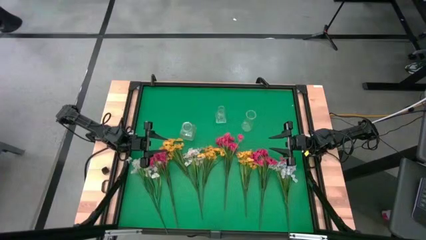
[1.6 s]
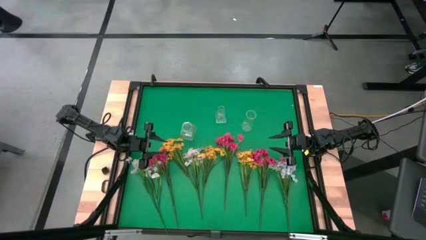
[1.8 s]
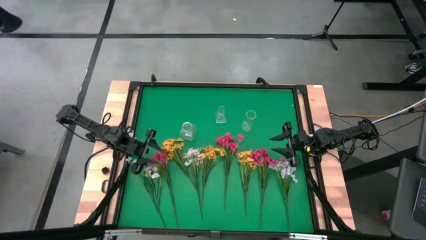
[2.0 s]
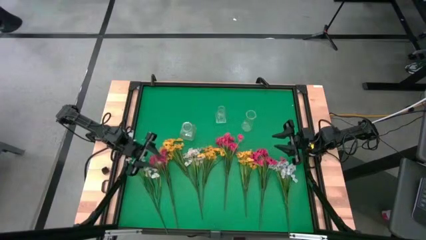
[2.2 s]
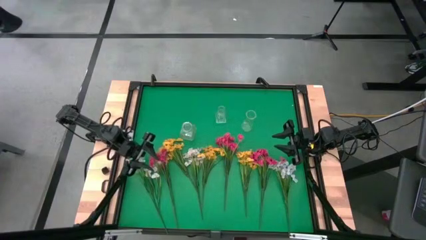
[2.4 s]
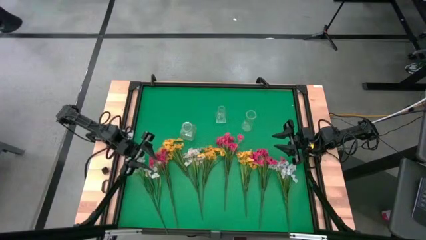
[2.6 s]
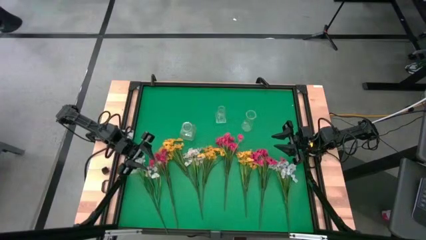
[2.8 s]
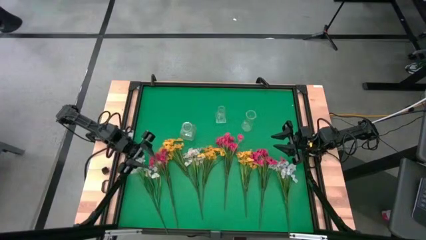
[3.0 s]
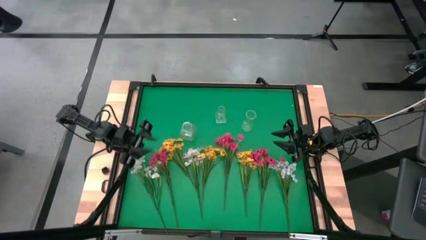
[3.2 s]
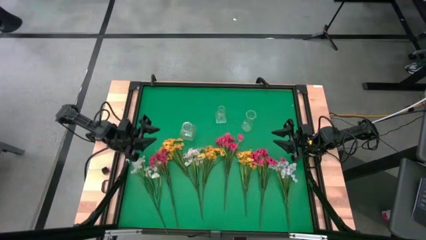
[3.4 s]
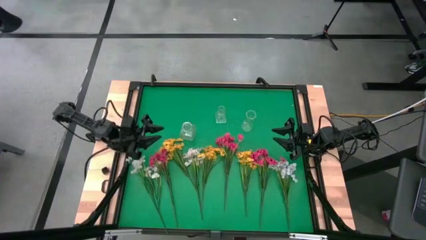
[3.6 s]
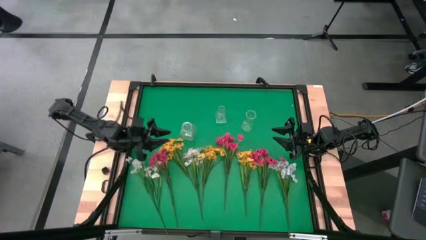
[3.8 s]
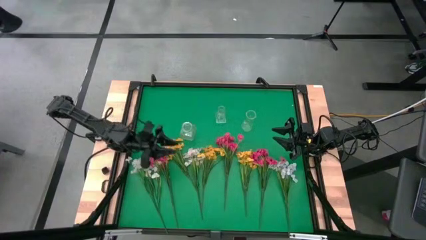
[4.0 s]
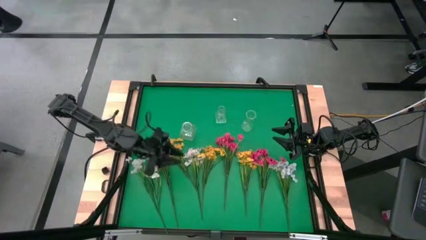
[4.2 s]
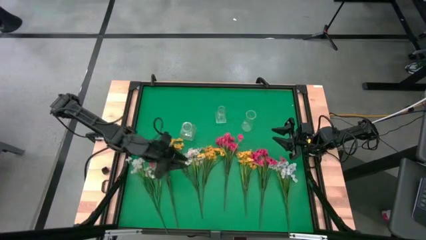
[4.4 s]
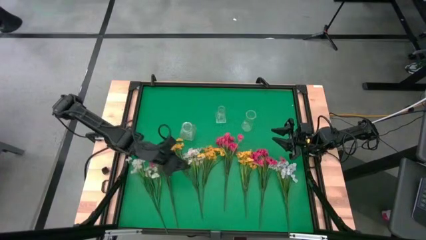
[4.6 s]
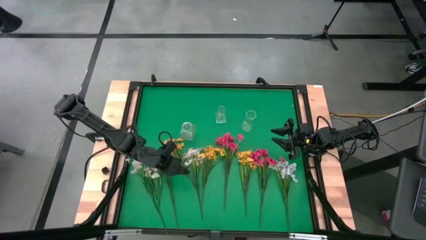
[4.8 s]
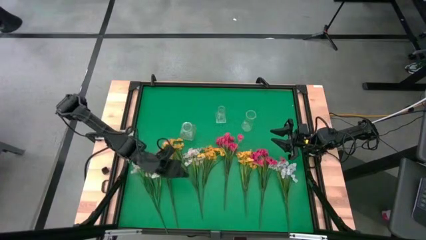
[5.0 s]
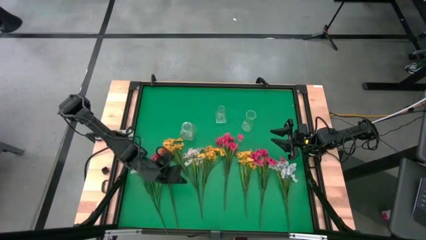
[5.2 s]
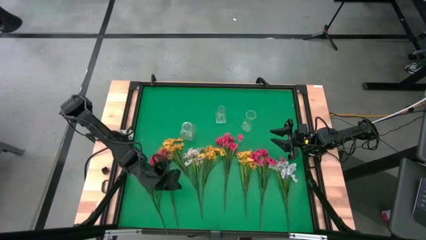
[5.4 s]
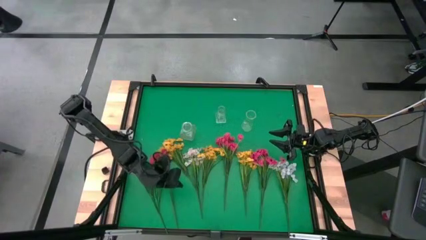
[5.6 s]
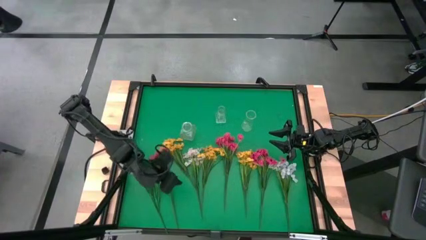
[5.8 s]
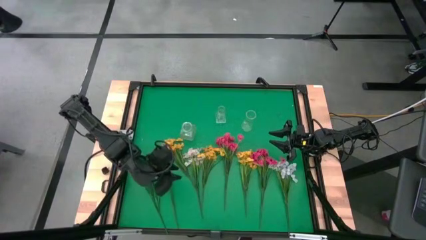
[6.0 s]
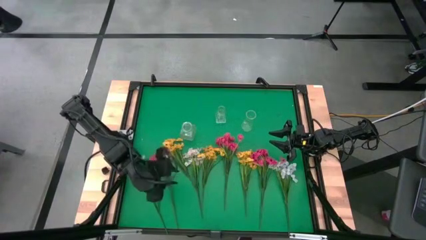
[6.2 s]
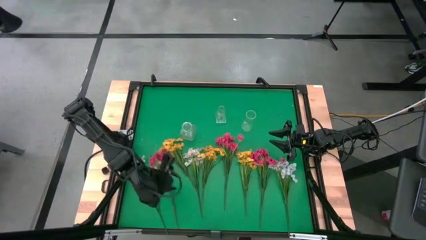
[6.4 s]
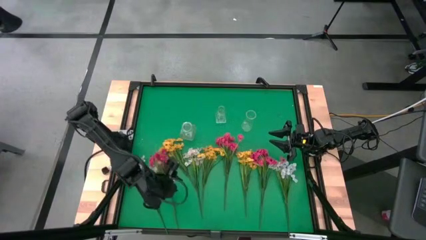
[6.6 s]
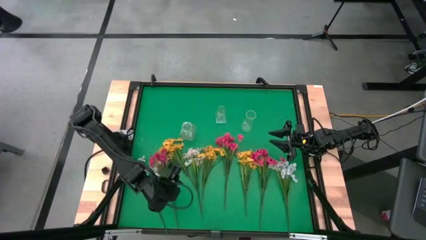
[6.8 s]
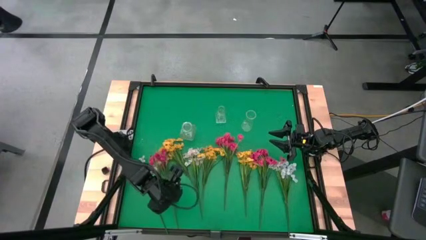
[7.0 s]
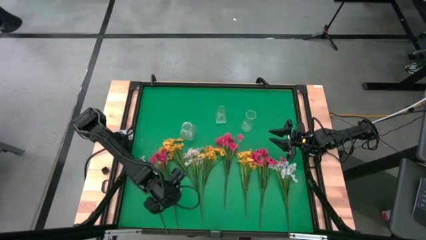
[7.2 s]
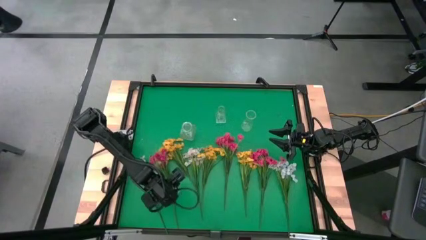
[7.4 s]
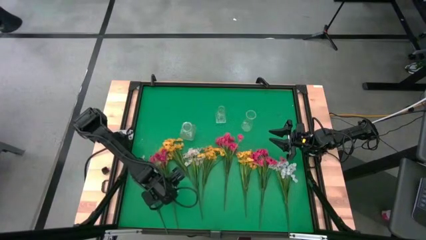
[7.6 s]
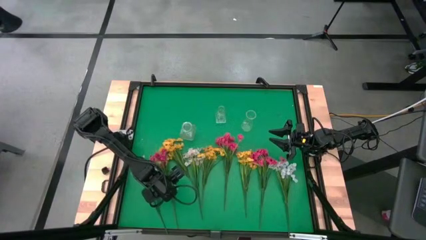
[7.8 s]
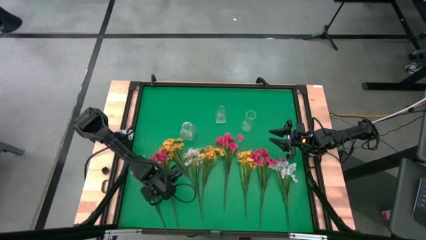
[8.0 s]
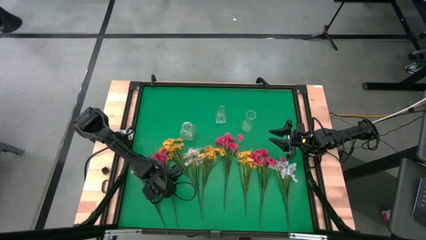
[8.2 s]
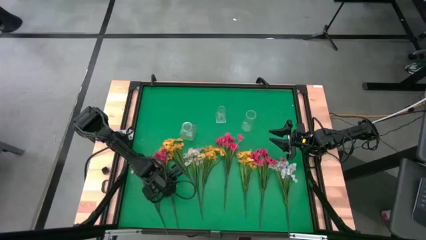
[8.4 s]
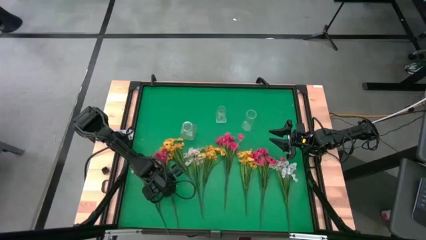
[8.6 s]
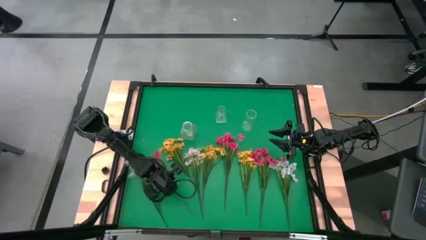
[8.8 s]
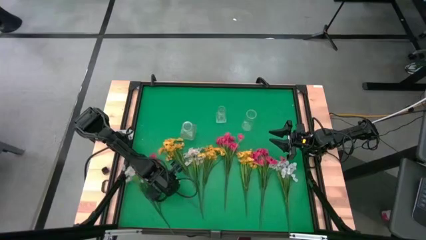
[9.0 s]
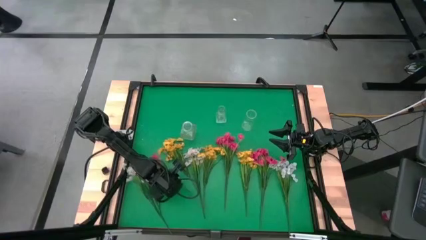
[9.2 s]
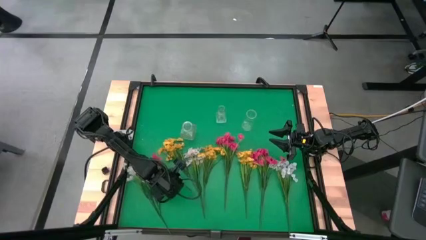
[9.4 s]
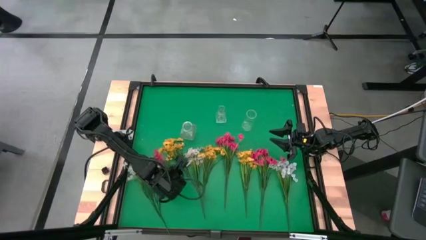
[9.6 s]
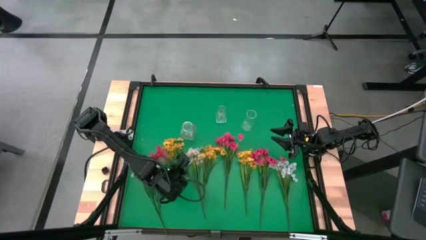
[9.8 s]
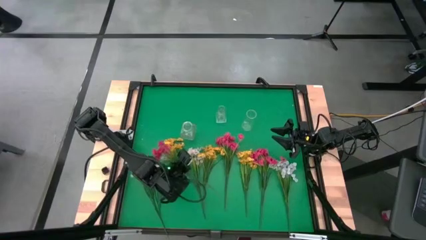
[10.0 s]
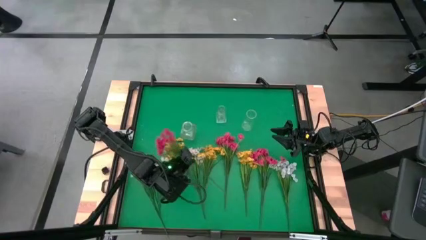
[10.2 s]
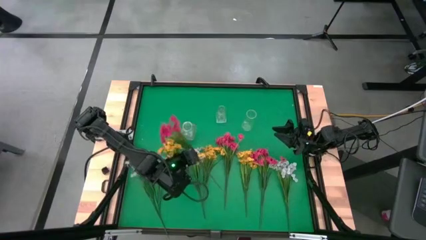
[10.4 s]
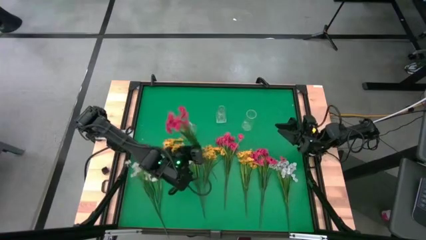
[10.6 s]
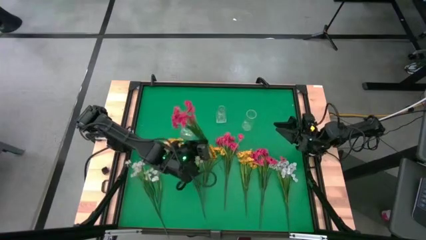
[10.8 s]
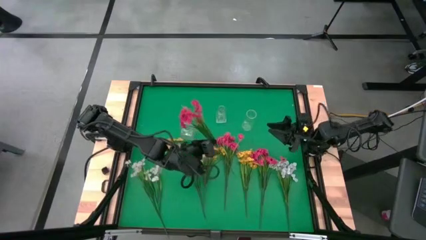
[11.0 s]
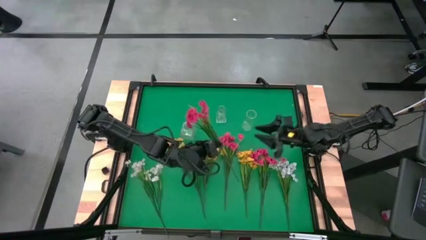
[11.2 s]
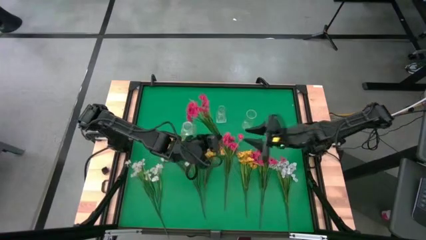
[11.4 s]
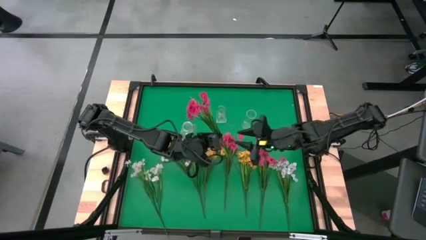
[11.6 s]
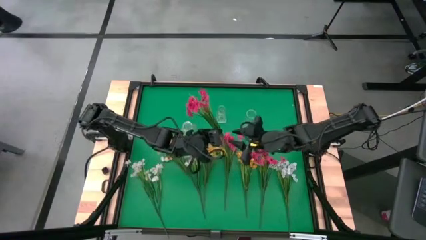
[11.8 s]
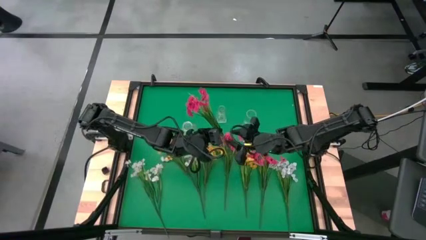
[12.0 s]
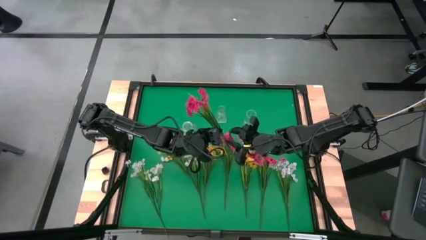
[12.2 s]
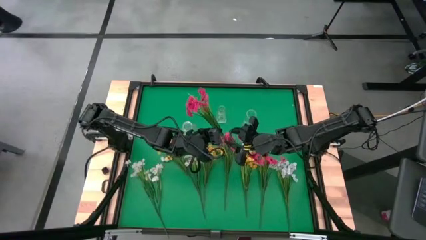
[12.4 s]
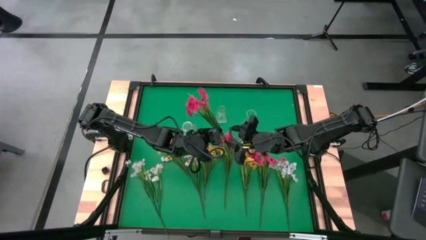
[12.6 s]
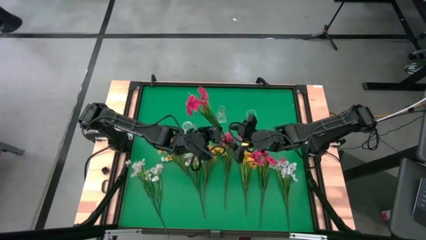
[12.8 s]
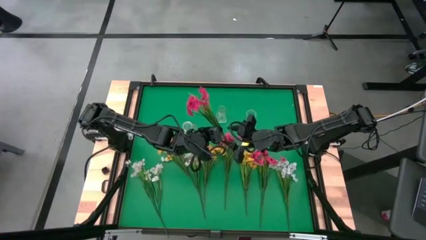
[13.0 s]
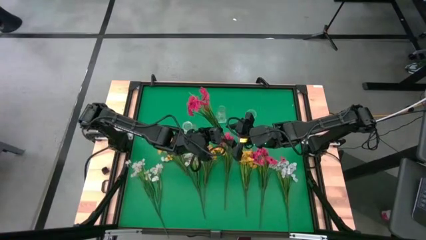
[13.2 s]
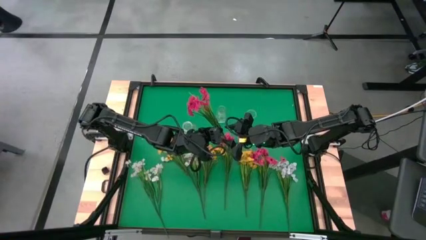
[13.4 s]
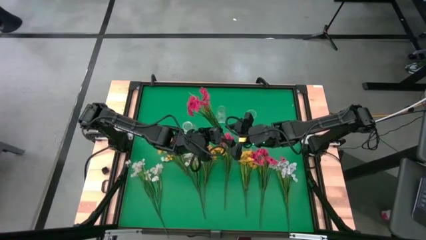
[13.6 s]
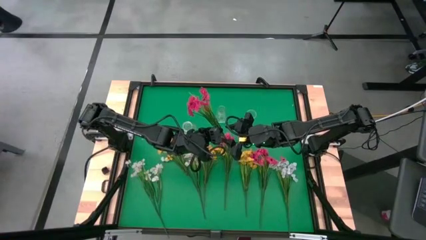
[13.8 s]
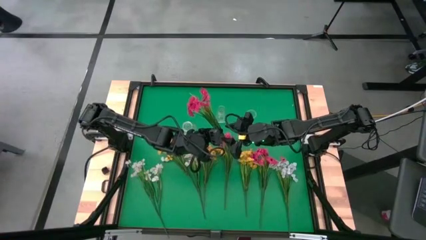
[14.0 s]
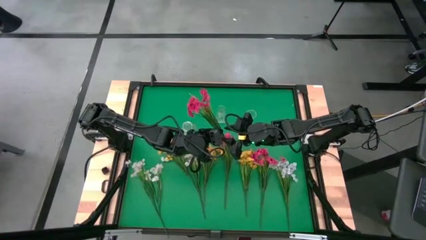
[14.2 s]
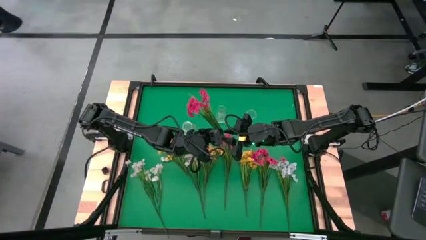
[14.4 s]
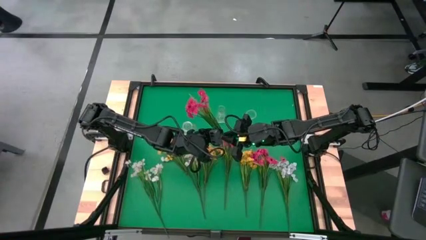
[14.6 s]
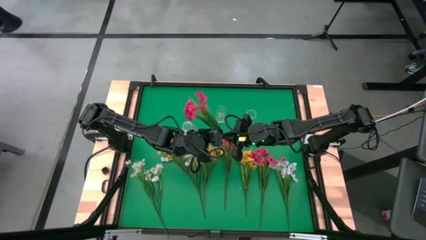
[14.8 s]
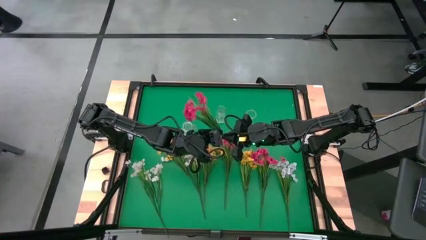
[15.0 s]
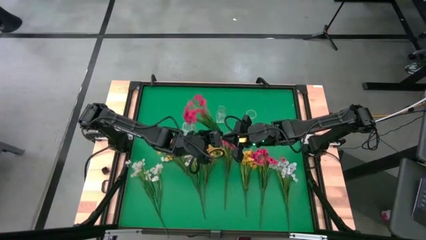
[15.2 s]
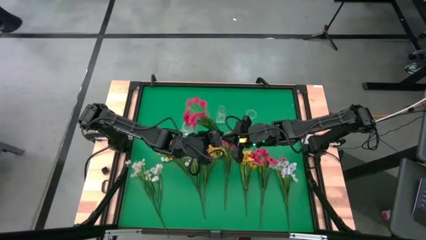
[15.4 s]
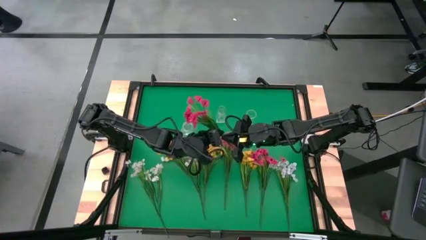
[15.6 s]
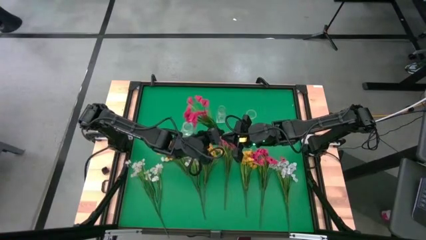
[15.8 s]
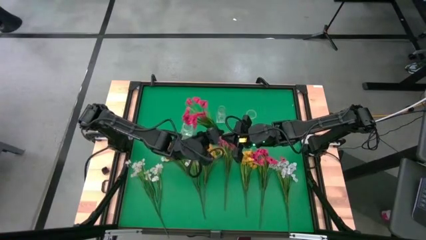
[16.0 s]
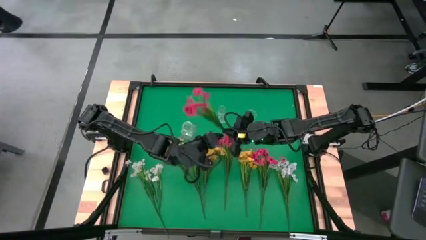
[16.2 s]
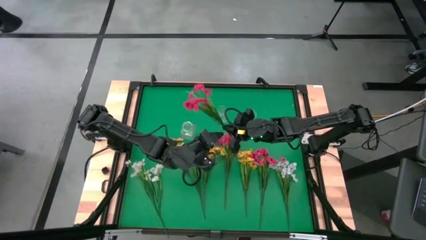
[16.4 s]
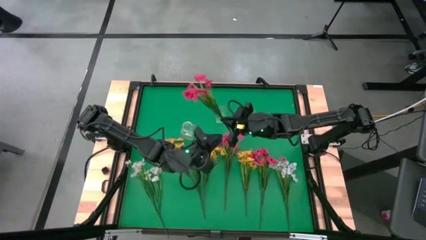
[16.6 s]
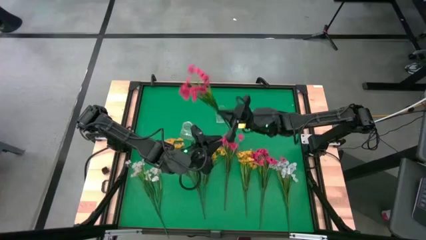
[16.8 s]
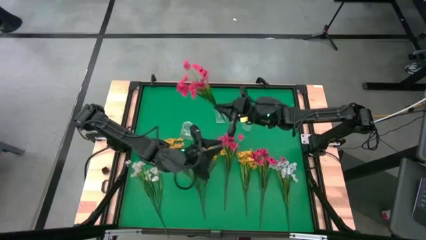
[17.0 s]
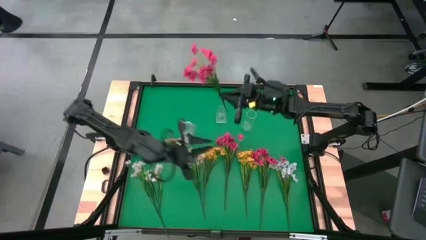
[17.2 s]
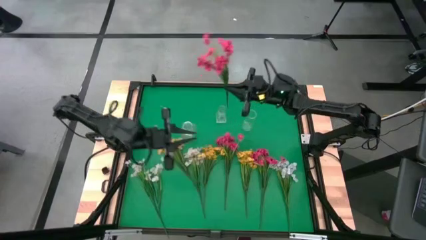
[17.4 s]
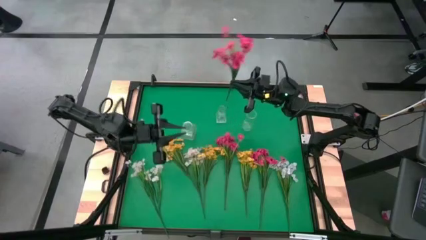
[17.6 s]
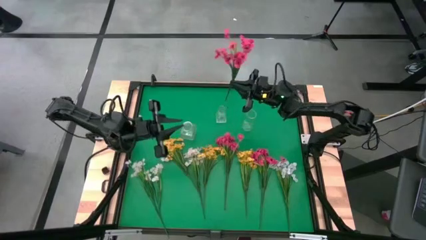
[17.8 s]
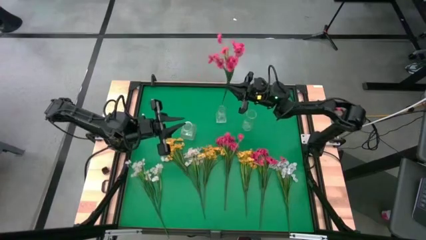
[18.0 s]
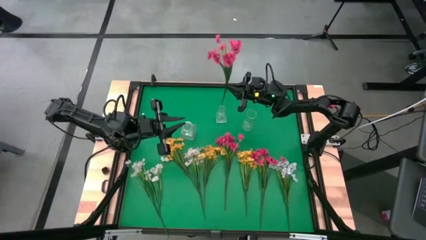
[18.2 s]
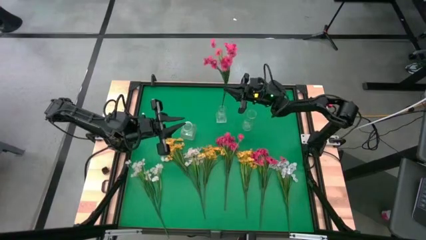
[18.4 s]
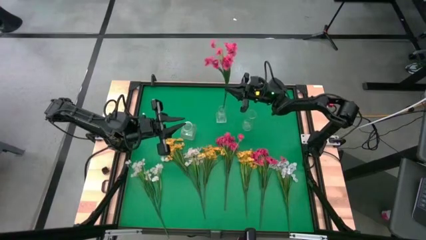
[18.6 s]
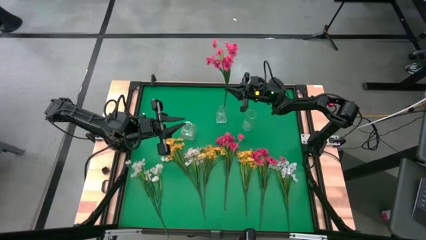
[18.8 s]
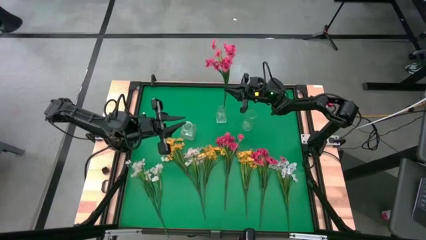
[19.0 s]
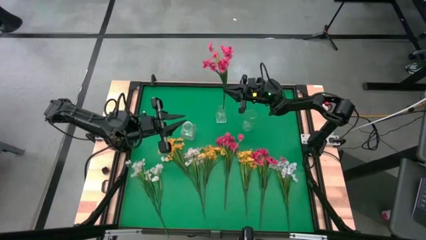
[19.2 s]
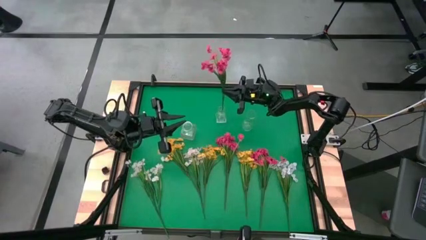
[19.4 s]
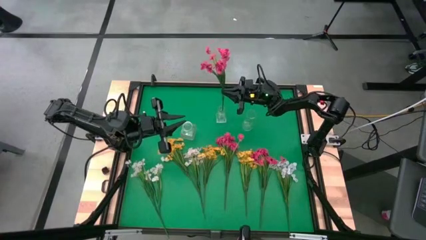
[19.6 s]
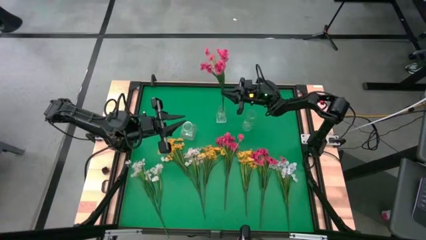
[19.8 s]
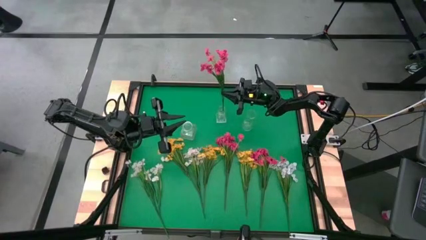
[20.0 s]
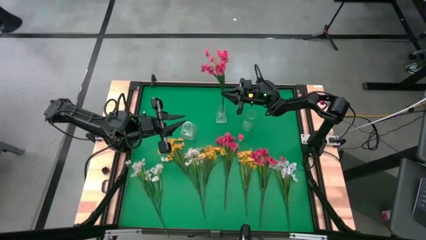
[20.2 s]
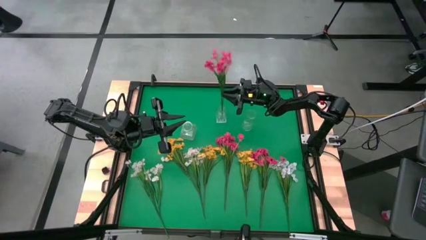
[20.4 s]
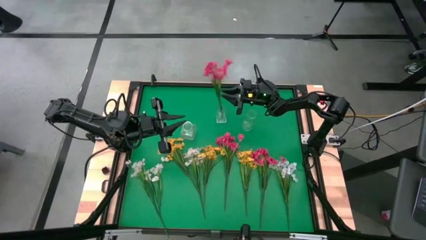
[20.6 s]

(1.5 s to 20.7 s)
Task: Sort flowers into vase by color
Put the left red flower into the center transparent vase
